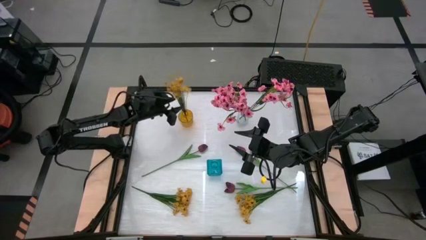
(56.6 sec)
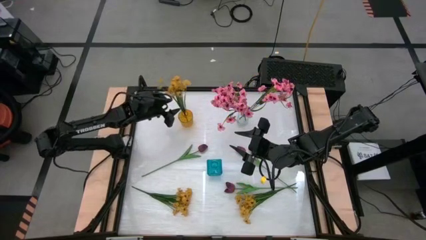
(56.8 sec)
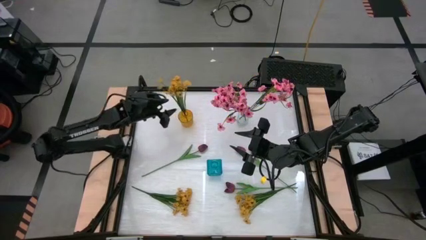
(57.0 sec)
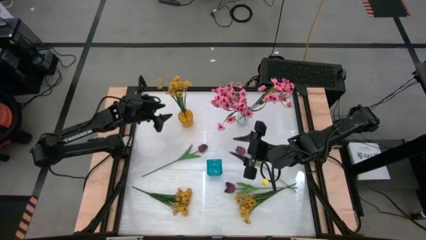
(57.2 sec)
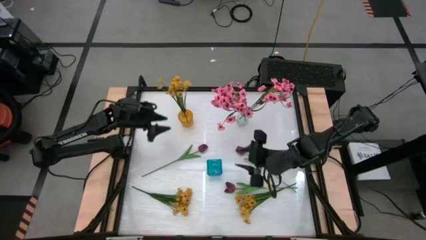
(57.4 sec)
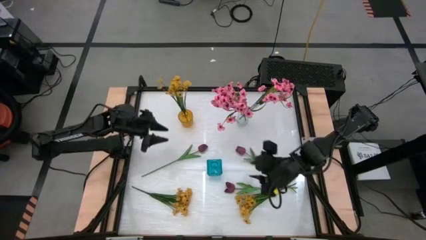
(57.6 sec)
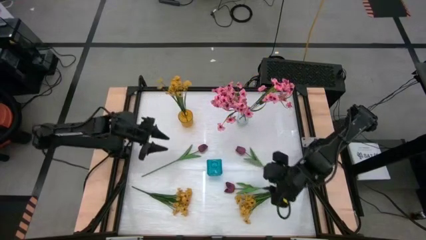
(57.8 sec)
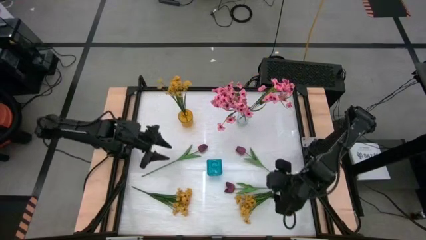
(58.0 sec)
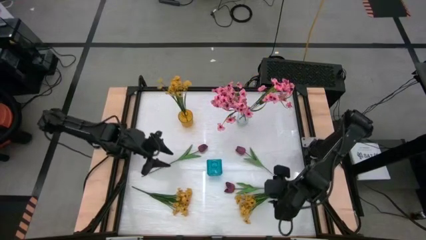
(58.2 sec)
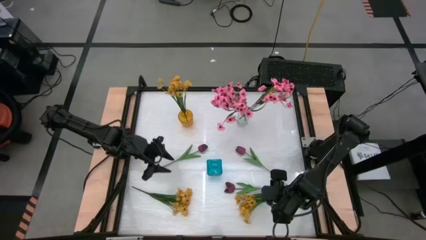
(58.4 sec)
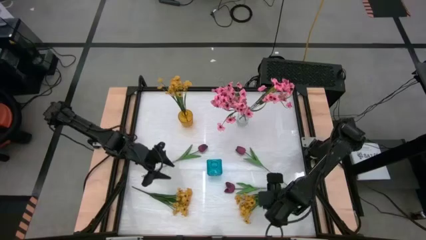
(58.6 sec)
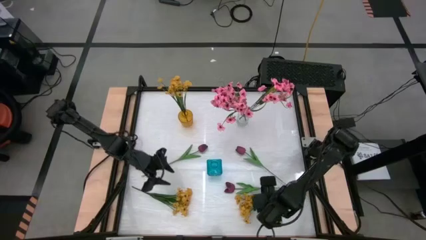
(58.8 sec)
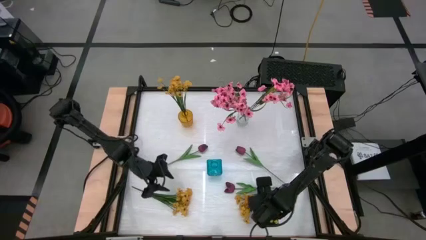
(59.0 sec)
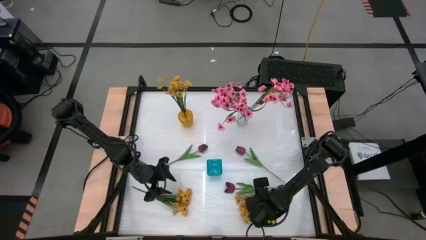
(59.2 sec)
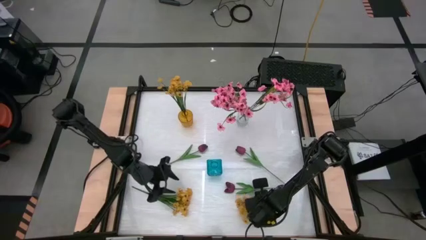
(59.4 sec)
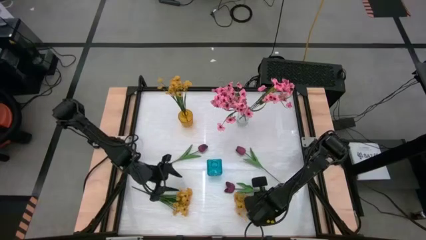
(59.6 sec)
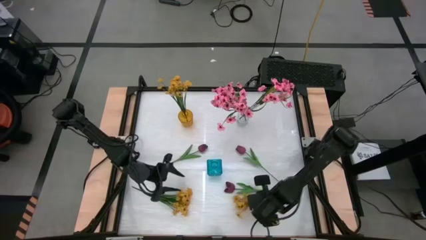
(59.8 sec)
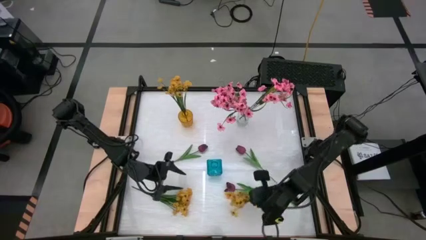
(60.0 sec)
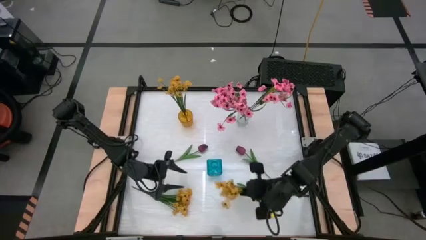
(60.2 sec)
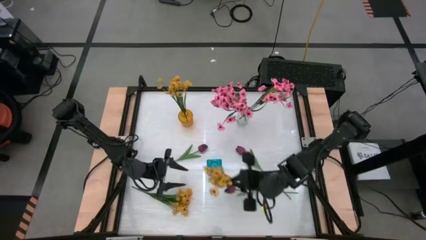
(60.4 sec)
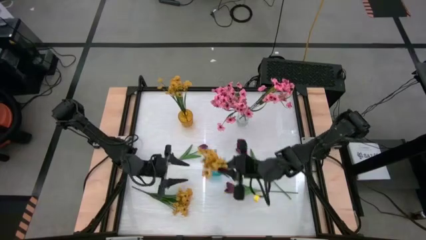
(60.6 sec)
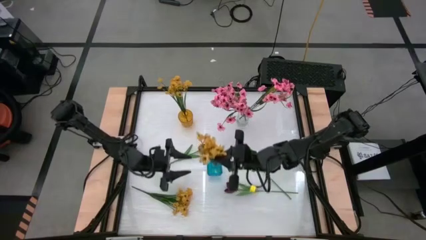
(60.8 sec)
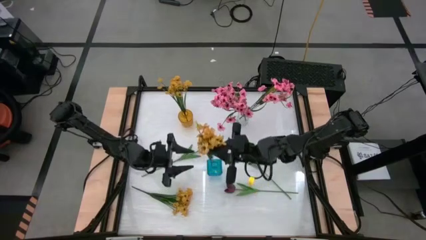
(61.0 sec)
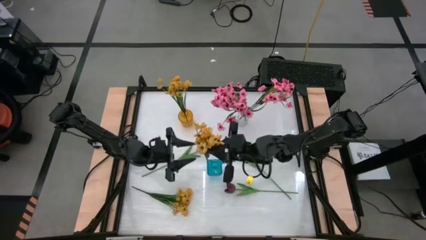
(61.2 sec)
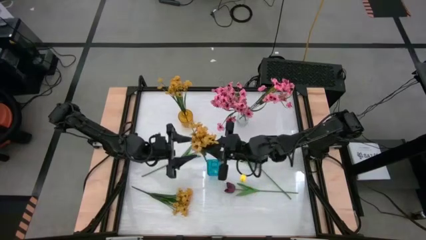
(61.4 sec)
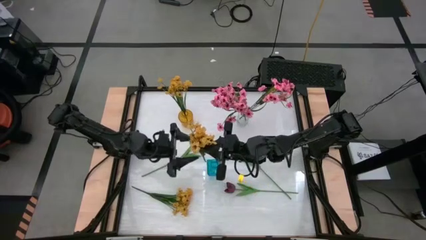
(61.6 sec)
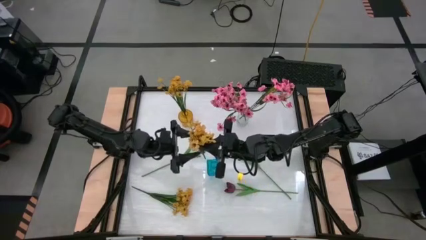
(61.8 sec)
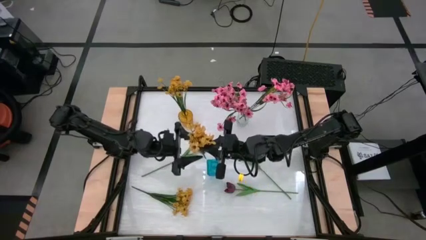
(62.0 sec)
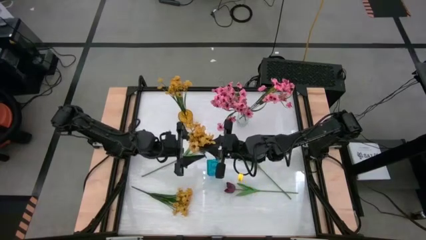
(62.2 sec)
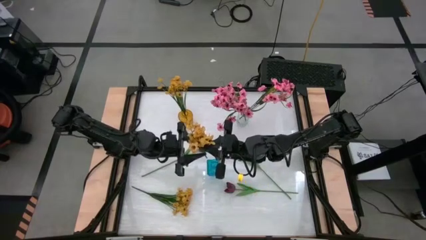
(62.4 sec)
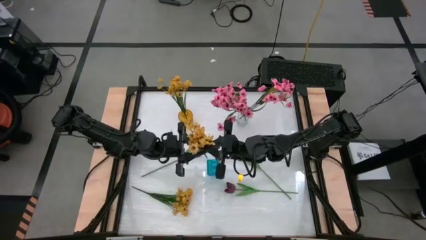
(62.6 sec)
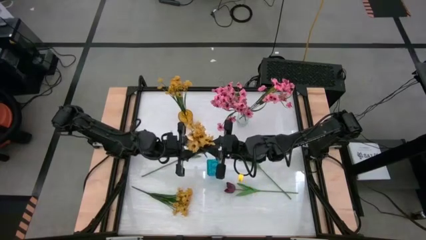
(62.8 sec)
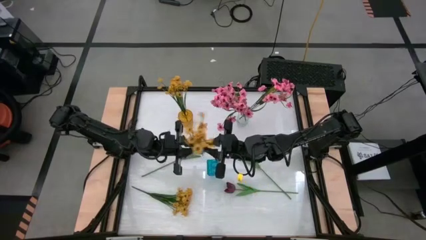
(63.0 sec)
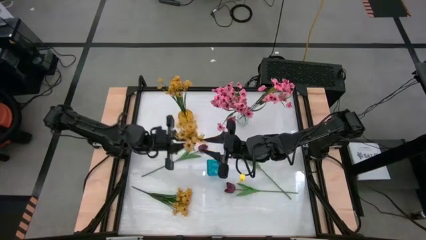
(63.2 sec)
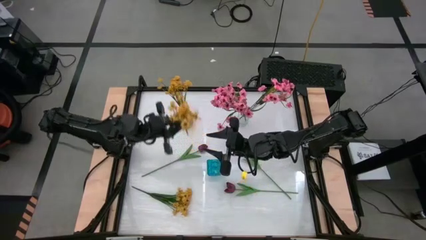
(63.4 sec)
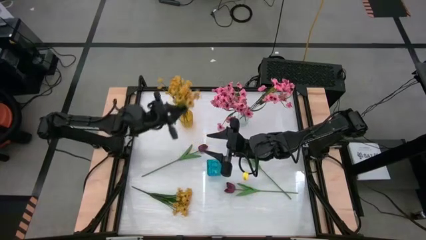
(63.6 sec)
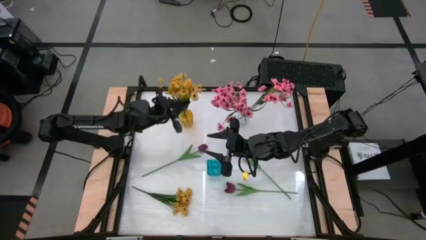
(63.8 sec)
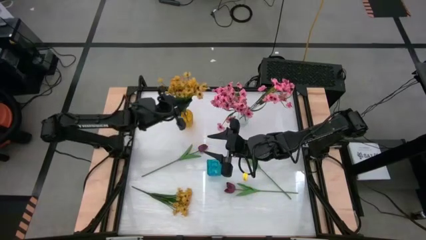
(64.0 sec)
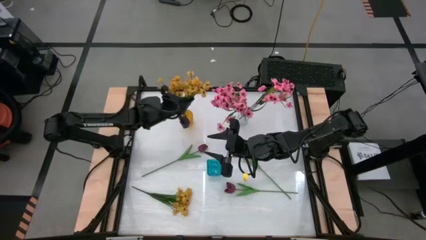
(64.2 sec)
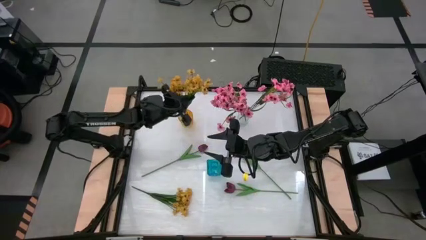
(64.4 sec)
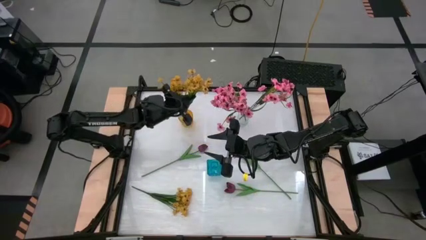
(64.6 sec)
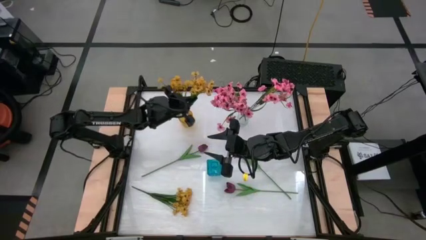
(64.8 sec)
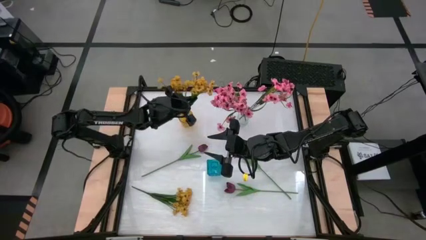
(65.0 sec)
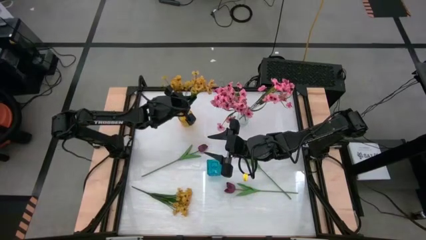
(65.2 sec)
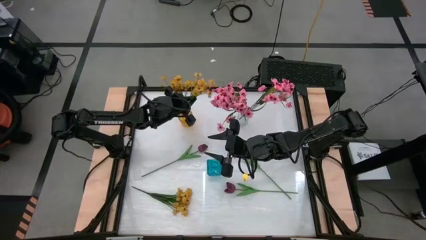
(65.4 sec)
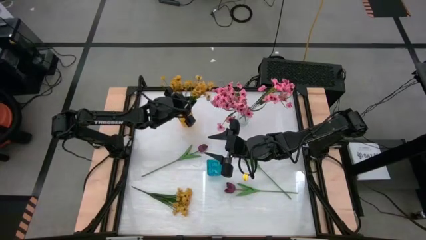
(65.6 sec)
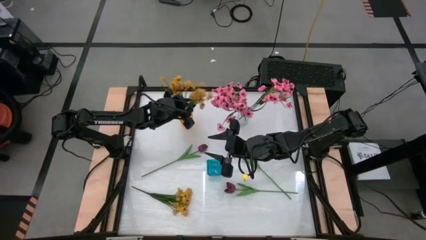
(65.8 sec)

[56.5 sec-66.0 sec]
Task: Sort flowers into vase by color
Put the right yellow flower into the yellow vase

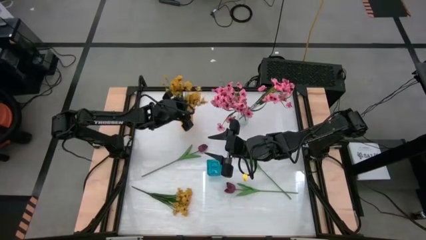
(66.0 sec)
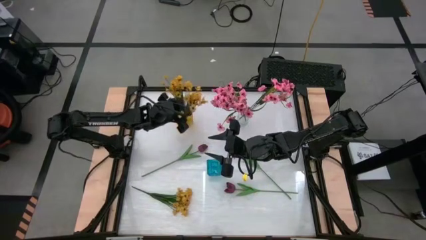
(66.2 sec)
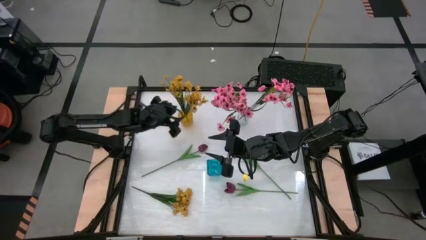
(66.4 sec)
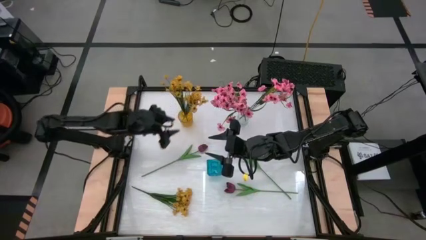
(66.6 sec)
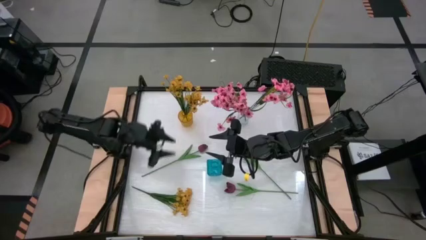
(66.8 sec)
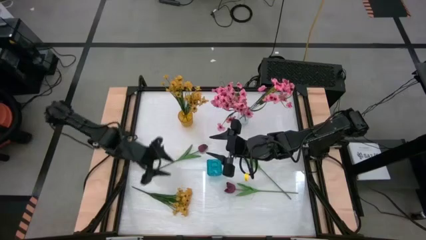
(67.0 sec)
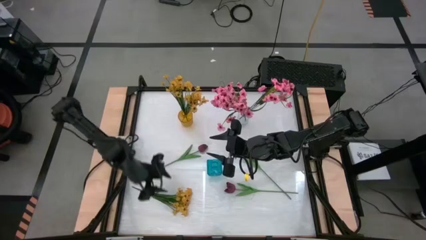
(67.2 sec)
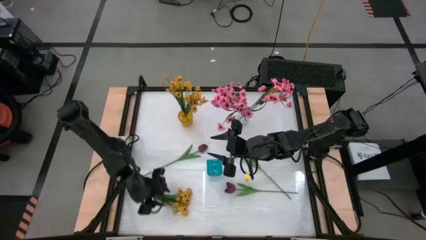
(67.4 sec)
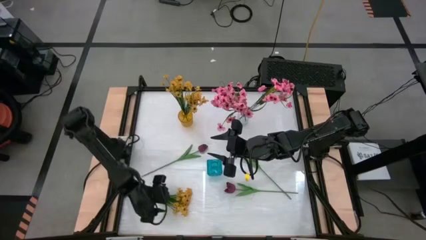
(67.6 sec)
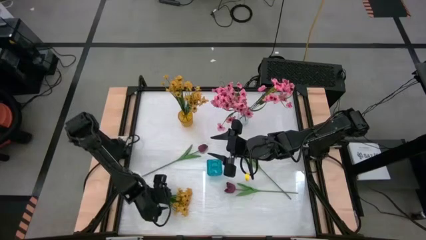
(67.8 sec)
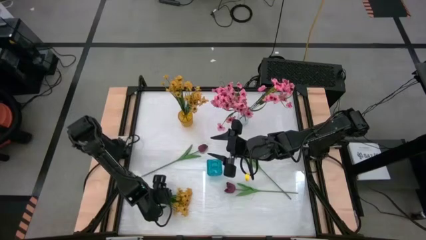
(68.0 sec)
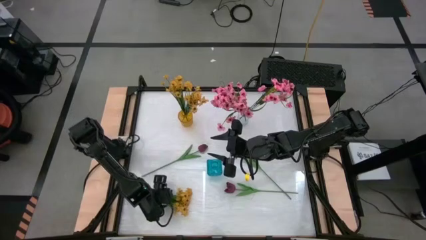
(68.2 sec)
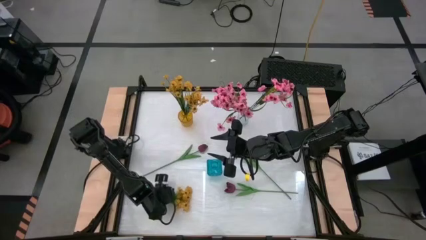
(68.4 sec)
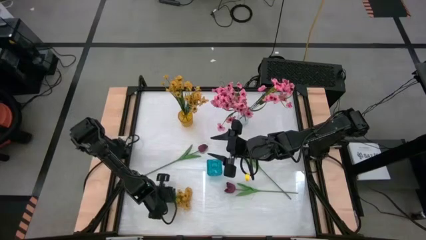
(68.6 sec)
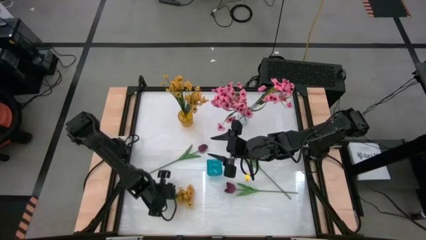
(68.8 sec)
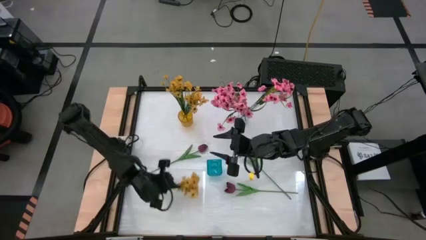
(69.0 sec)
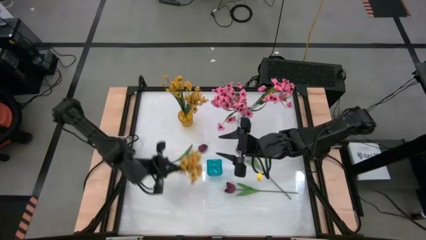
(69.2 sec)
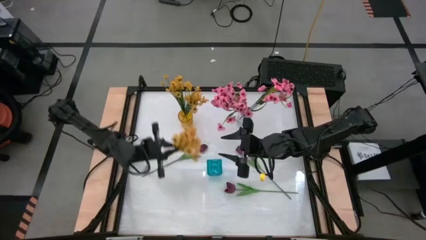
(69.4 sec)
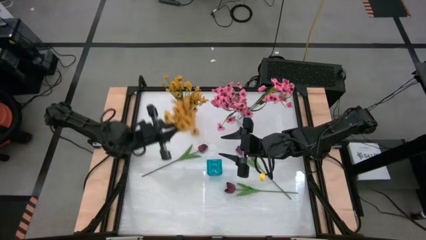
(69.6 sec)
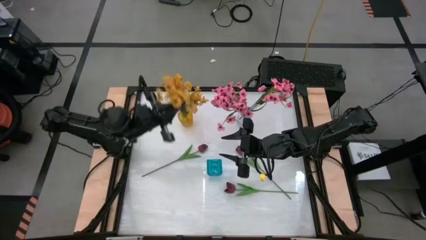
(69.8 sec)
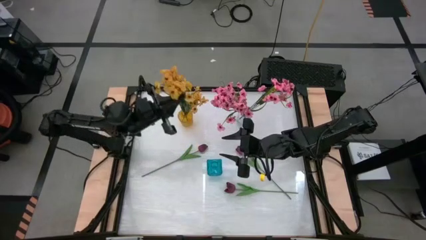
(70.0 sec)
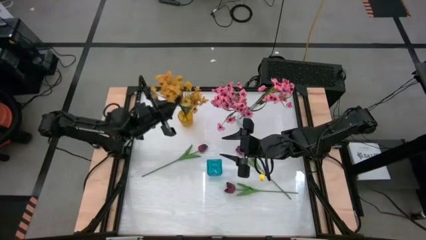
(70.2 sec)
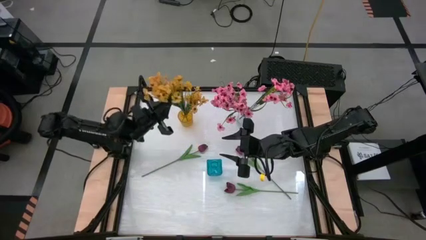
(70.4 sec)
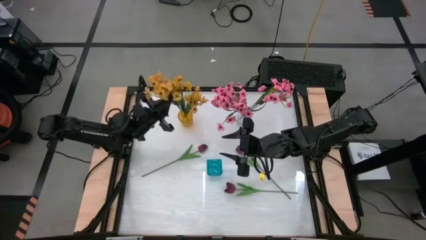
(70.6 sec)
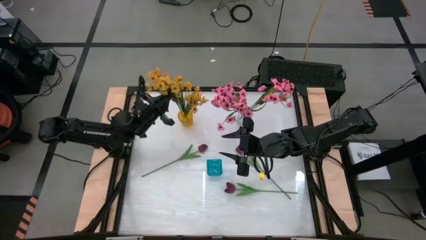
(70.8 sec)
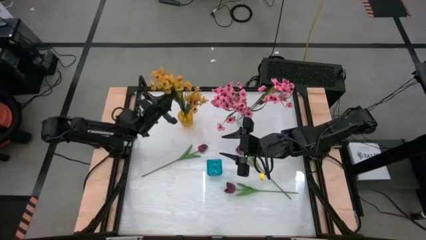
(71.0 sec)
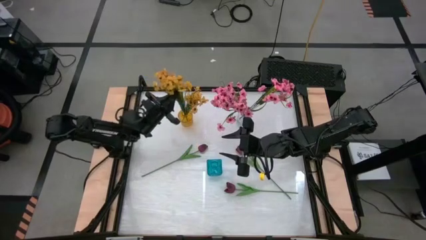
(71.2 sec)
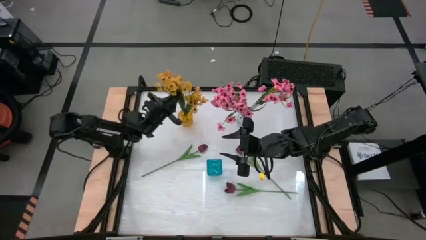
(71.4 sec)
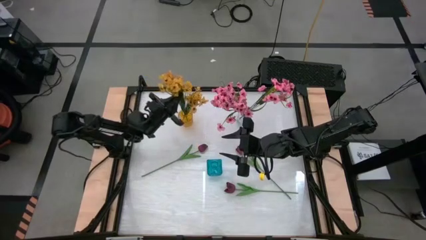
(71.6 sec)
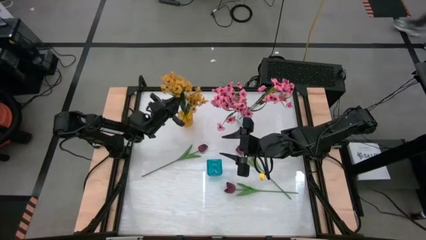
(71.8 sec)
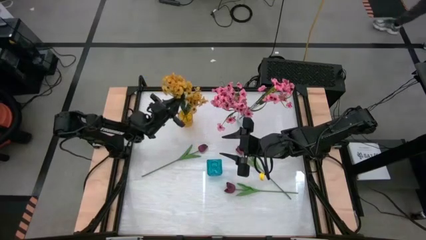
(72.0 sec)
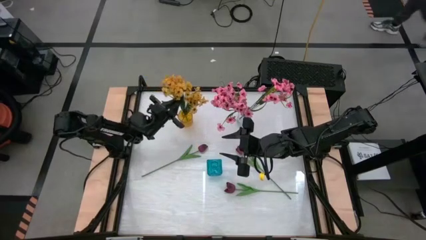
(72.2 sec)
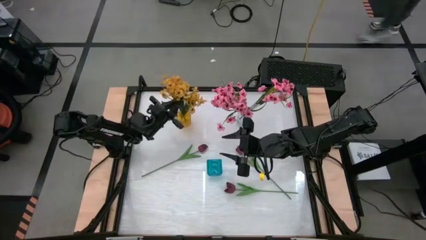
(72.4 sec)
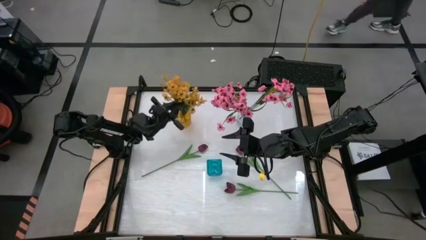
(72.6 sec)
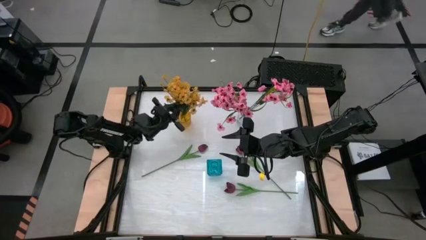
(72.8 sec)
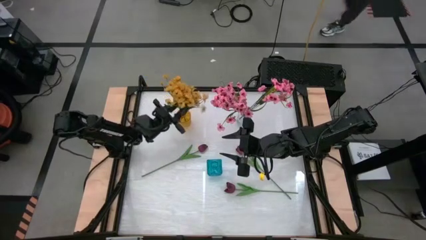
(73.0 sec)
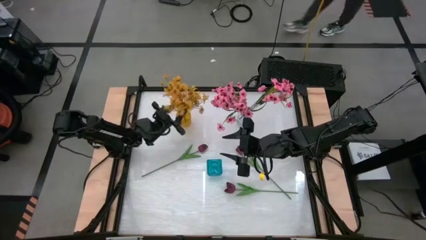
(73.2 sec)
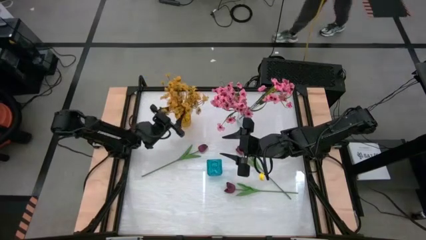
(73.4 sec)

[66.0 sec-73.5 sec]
Put the yellow flower into the yellow vase
